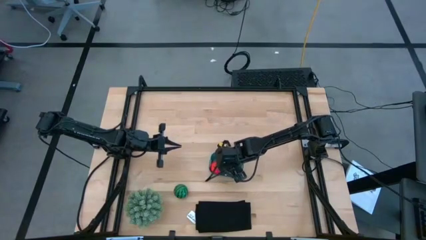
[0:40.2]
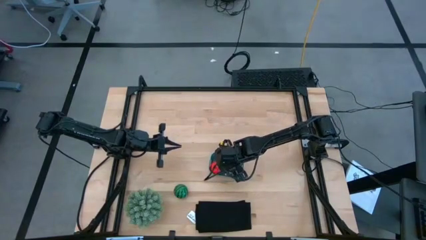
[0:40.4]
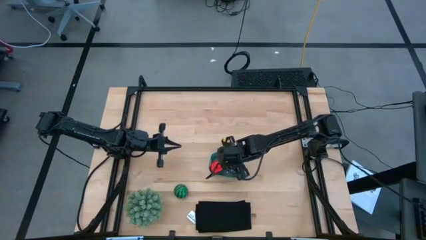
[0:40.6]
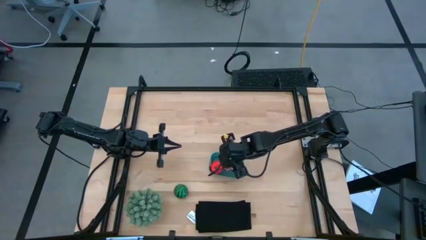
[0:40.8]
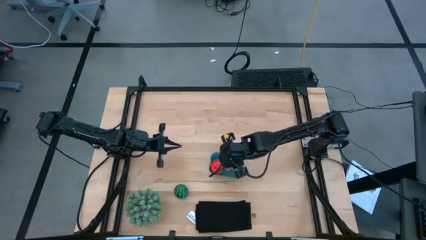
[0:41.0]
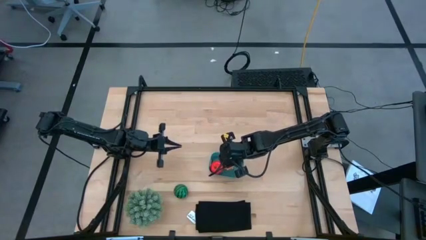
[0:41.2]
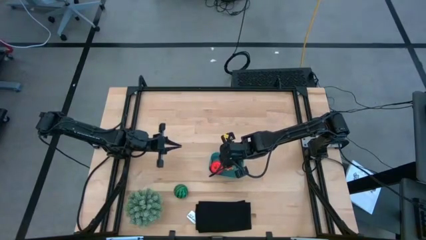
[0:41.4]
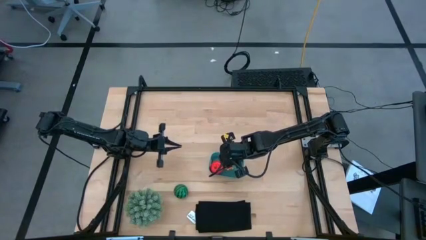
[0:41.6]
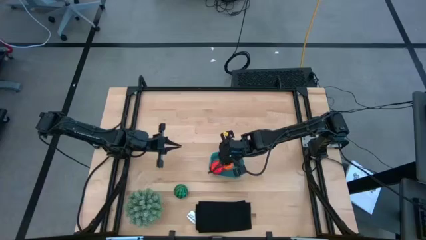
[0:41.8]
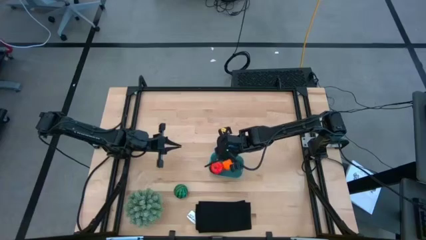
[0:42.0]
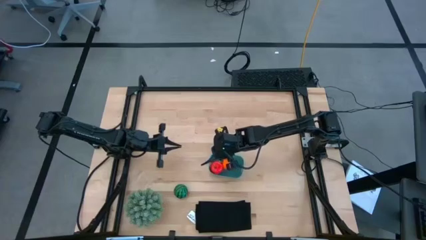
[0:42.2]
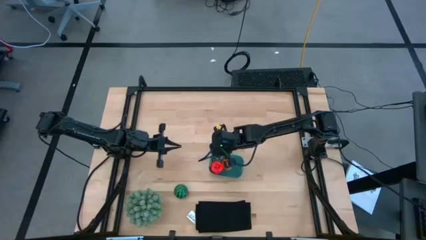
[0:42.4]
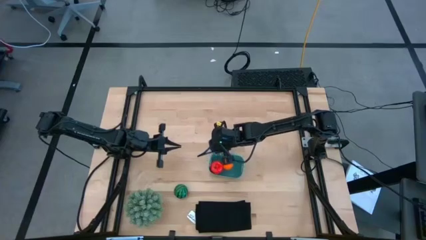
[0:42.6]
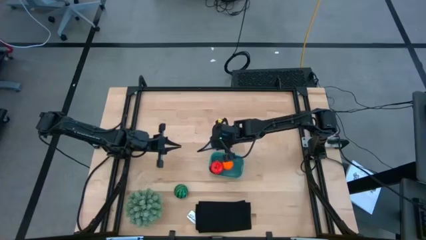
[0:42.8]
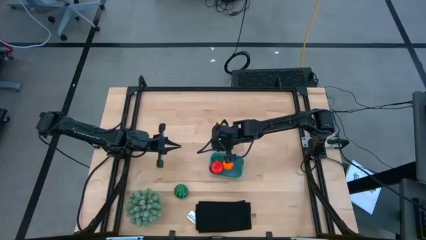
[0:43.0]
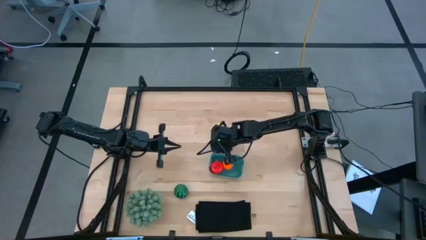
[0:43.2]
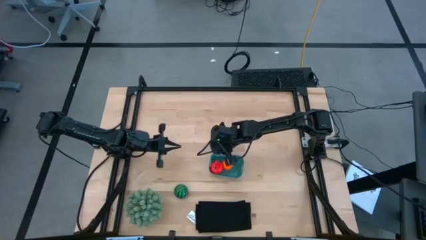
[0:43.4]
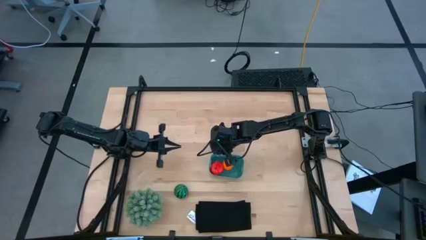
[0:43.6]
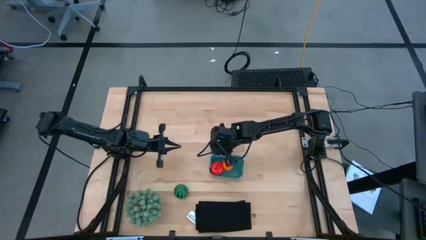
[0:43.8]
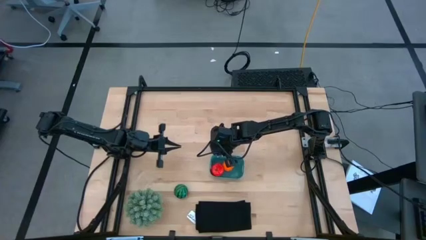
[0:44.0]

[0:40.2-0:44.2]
Task: Pick and placing Produce into tupperware
Adjust the basket on the table

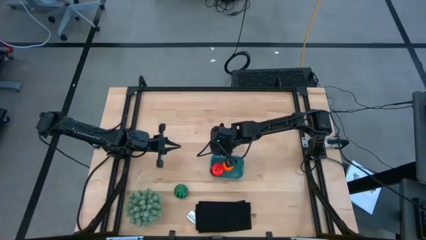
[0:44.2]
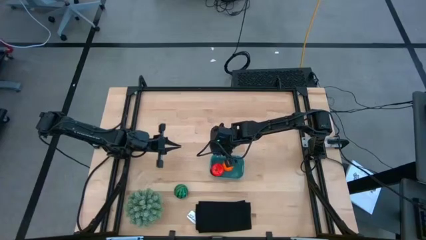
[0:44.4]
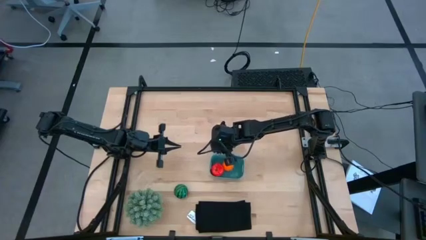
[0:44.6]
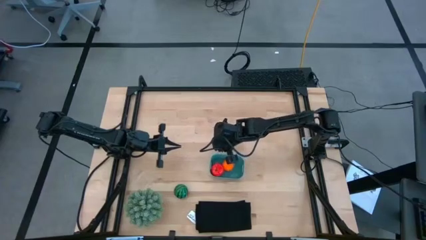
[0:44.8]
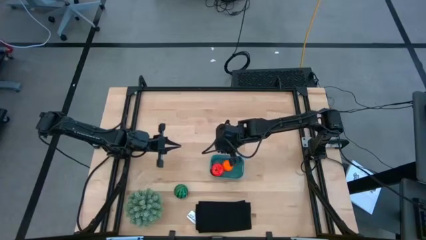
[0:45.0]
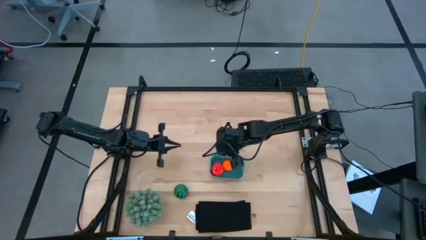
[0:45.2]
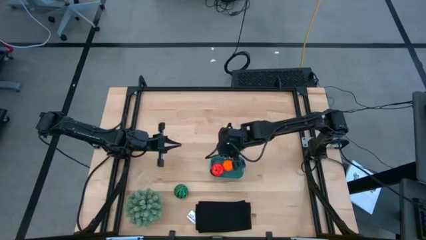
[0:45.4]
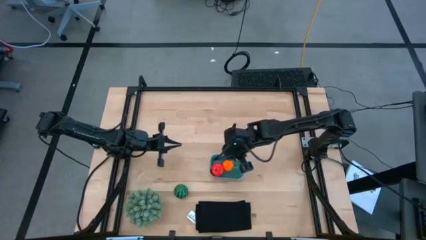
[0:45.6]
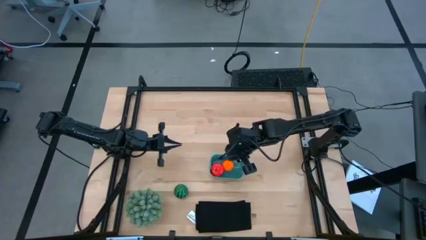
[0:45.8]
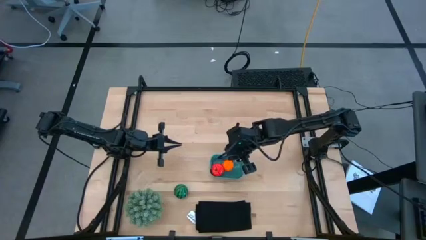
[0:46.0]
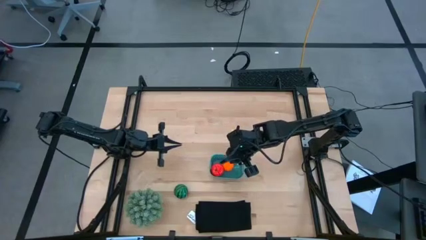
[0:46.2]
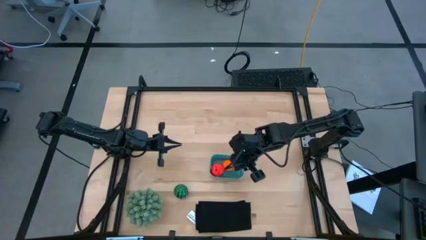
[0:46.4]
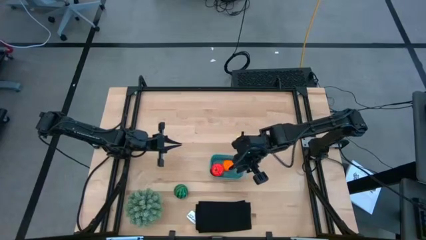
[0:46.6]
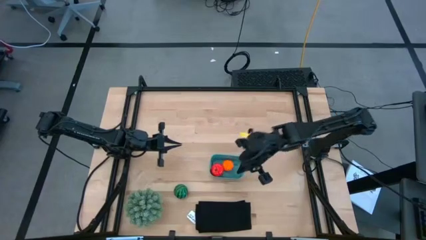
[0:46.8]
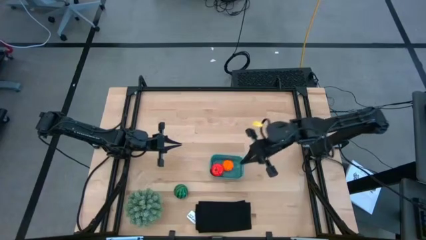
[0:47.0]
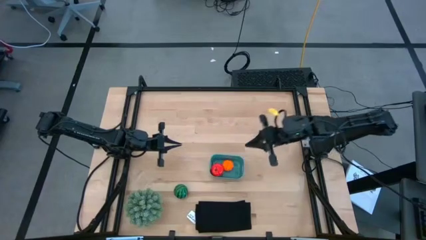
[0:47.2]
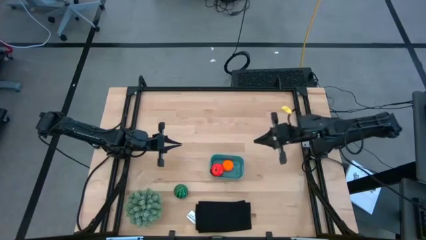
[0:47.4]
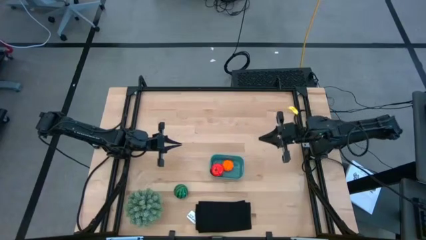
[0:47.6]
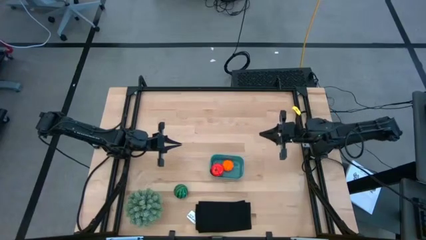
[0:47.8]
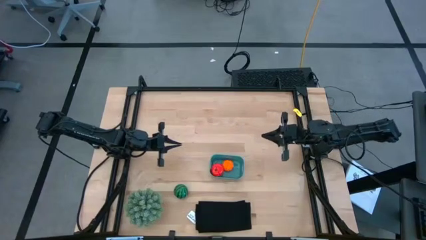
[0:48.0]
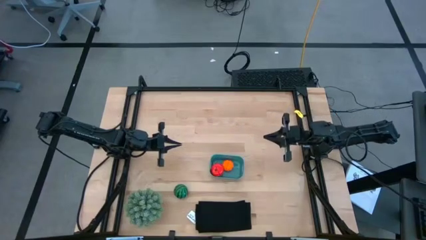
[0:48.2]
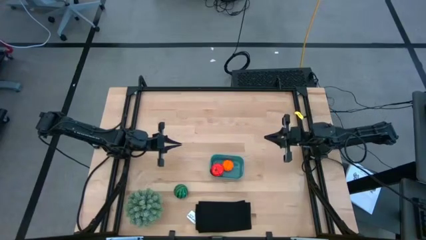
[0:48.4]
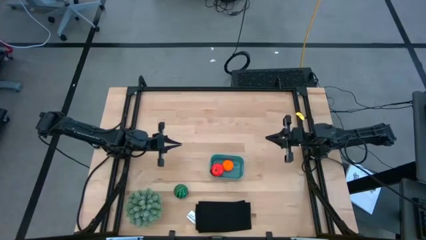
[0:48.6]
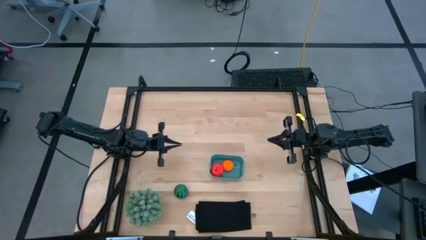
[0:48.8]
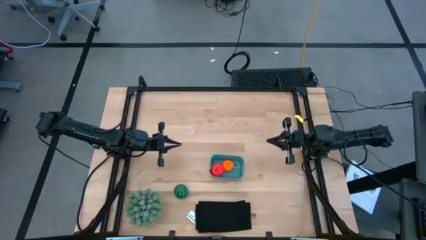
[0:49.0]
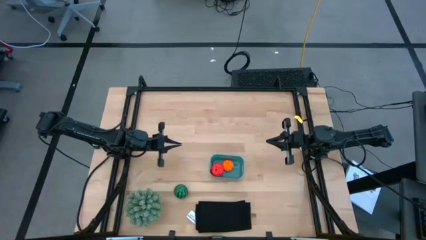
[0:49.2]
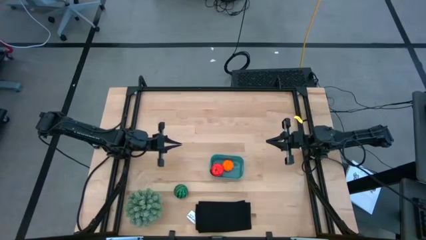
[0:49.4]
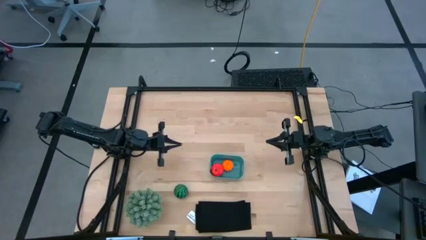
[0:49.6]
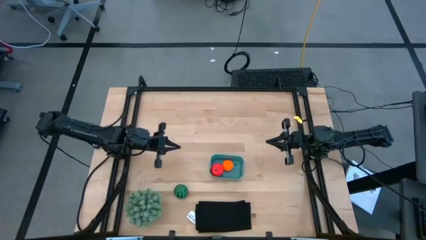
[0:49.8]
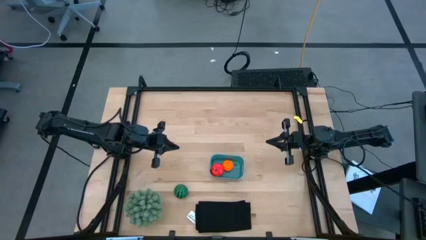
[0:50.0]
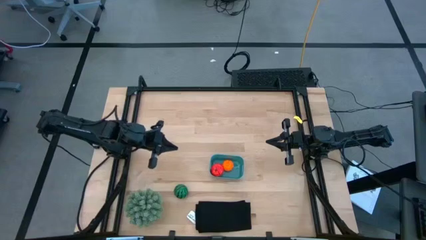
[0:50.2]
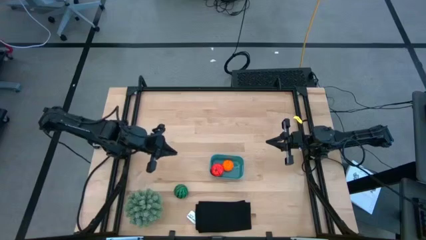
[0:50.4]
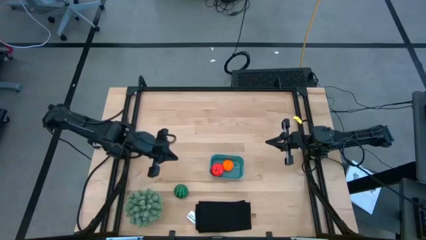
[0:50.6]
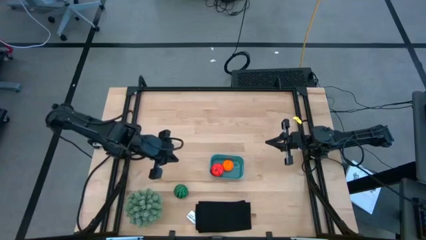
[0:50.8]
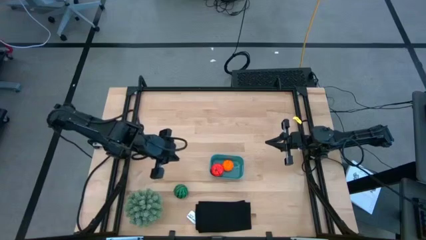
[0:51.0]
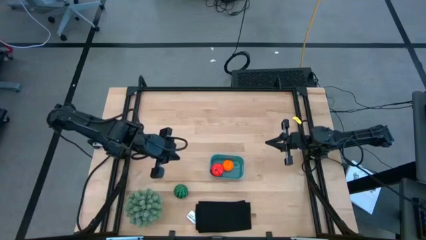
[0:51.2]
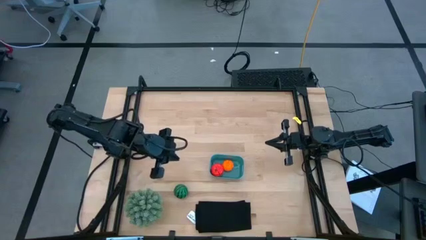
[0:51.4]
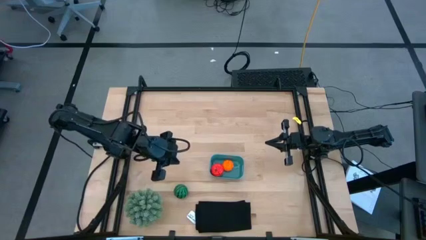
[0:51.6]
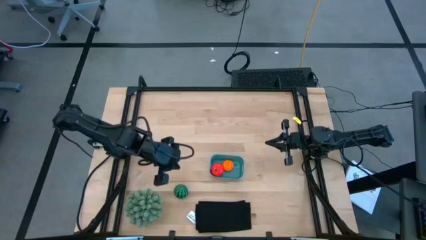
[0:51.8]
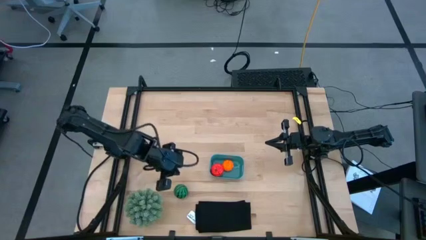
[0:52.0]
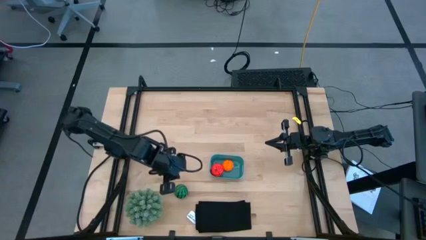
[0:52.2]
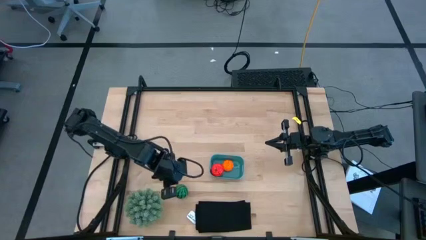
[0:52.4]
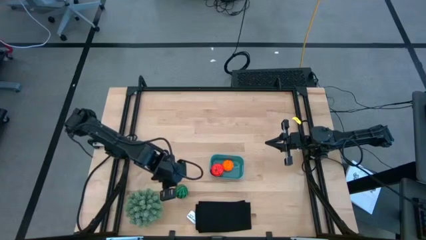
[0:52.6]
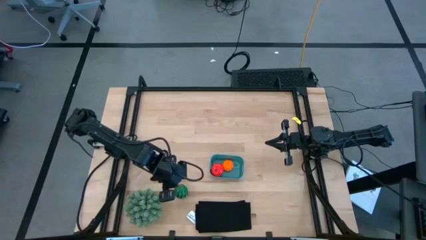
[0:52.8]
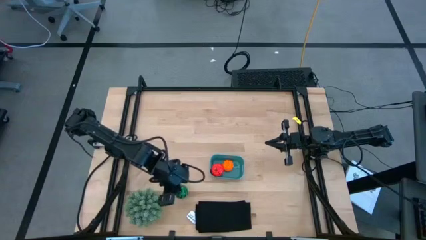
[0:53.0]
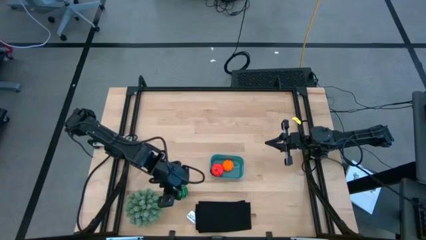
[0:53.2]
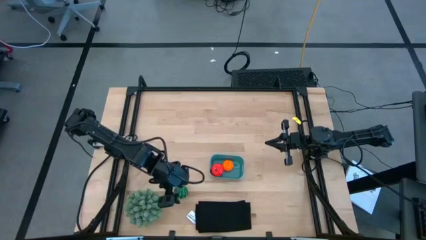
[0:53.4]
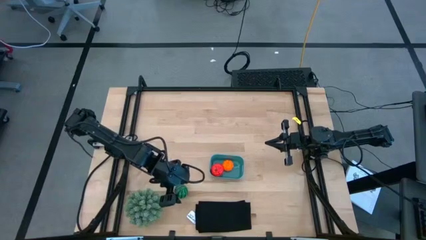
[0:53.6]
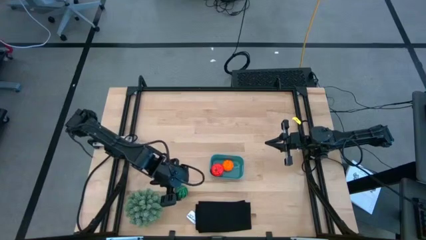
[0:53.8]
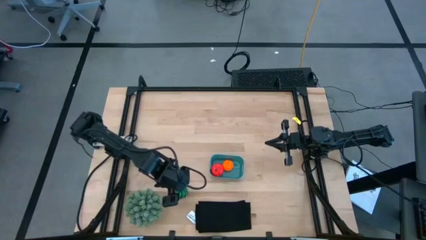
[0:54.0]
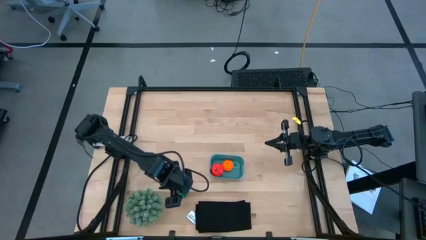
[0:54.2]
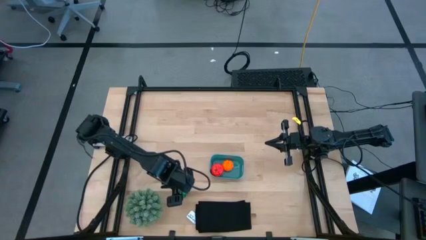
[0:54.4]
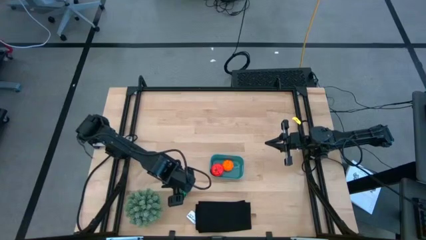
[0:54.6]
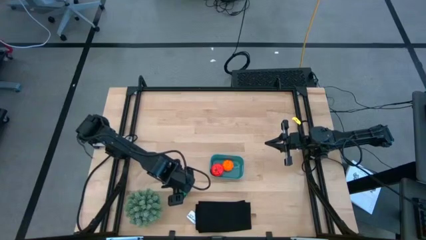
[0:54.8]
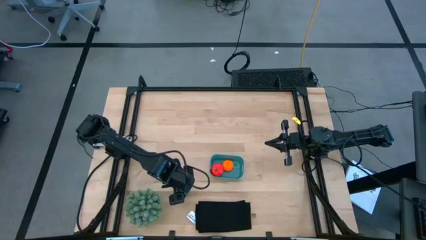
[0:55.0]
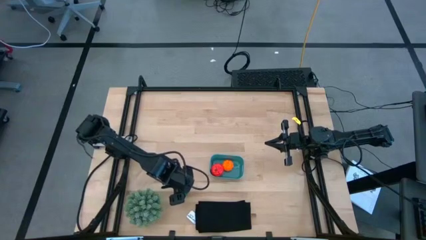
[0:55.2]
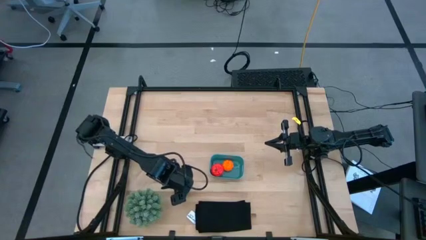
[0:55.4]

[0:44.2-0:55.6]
Put the watermelon into the basket
